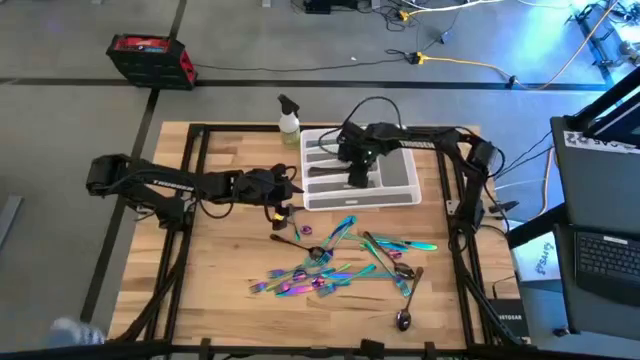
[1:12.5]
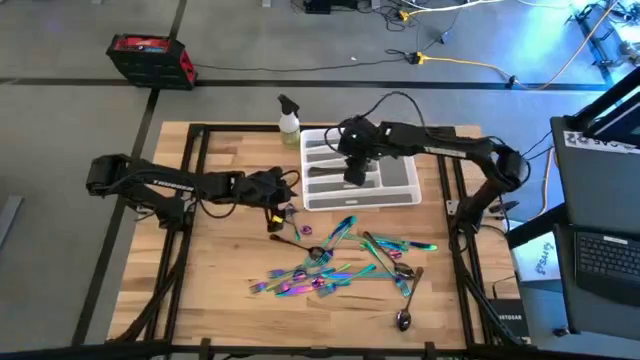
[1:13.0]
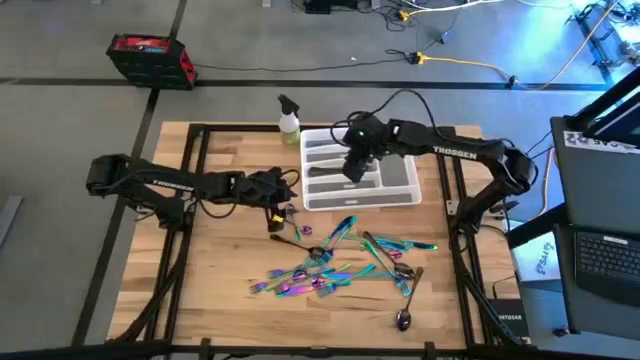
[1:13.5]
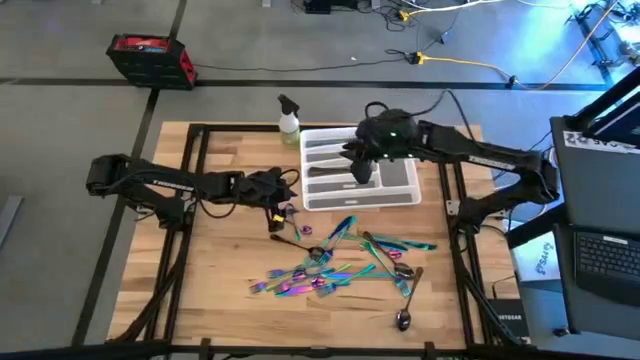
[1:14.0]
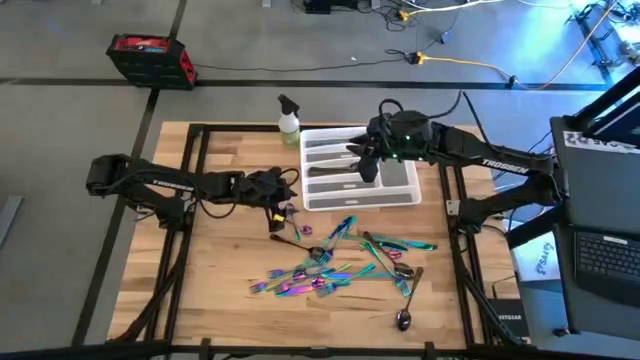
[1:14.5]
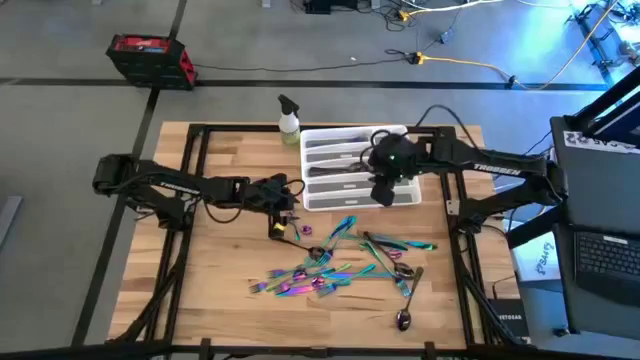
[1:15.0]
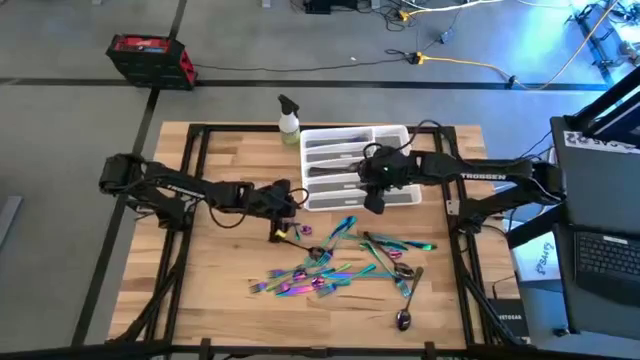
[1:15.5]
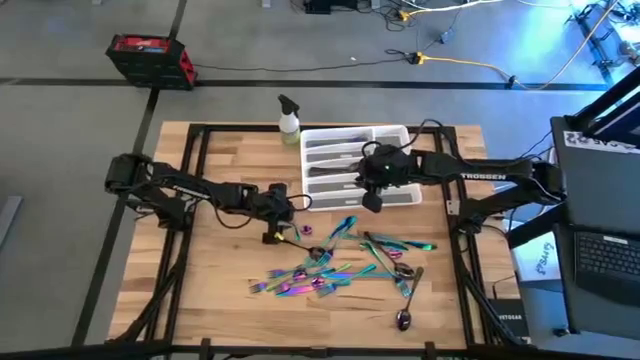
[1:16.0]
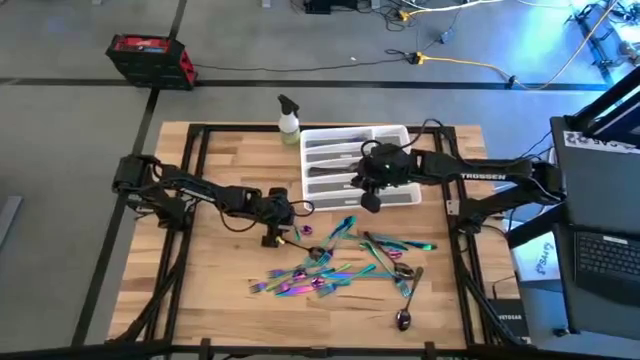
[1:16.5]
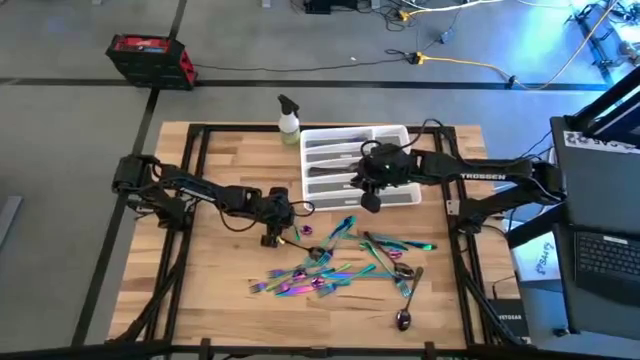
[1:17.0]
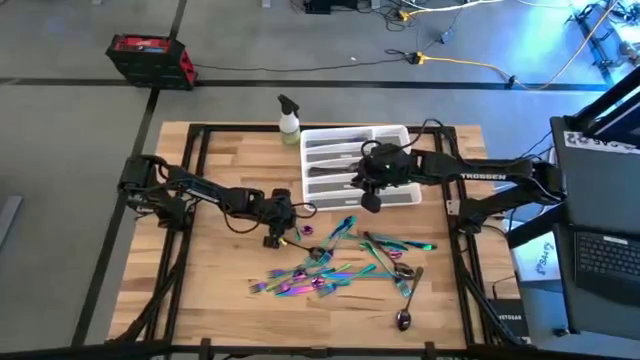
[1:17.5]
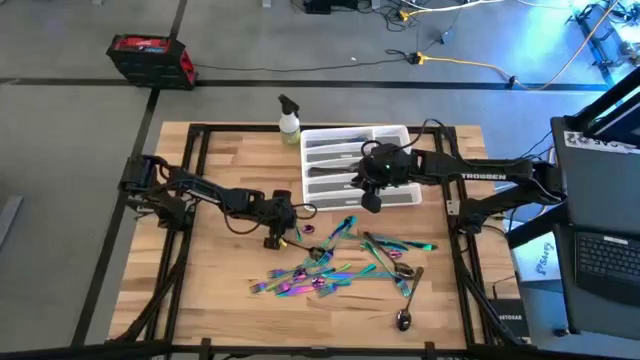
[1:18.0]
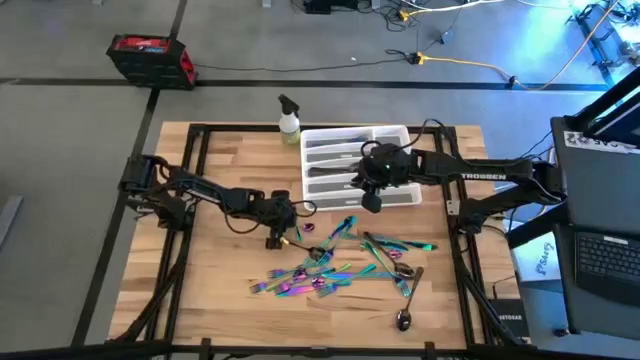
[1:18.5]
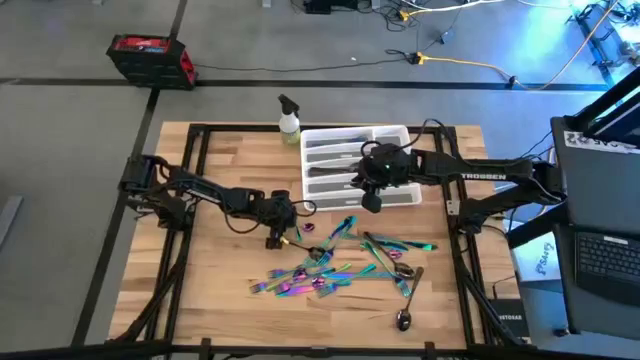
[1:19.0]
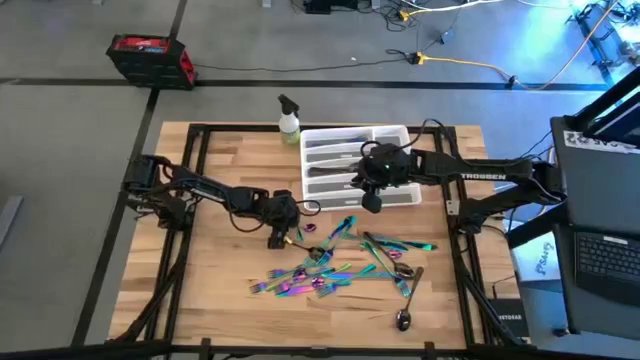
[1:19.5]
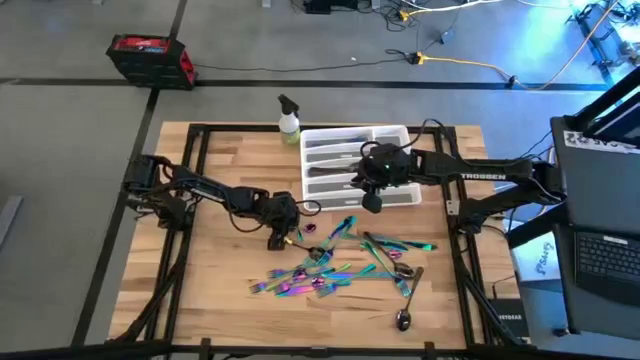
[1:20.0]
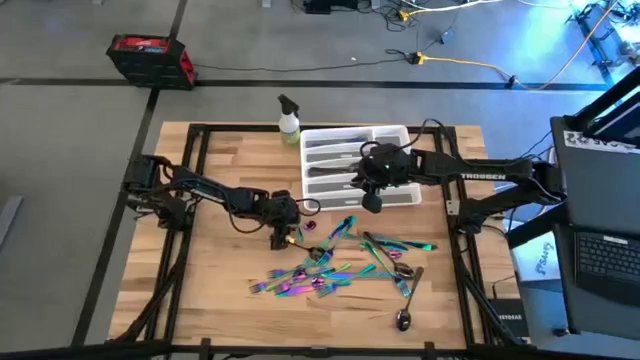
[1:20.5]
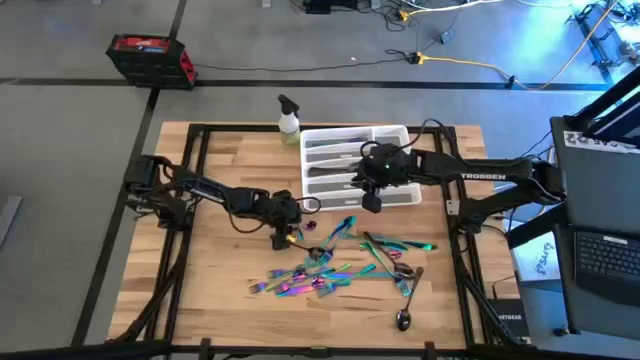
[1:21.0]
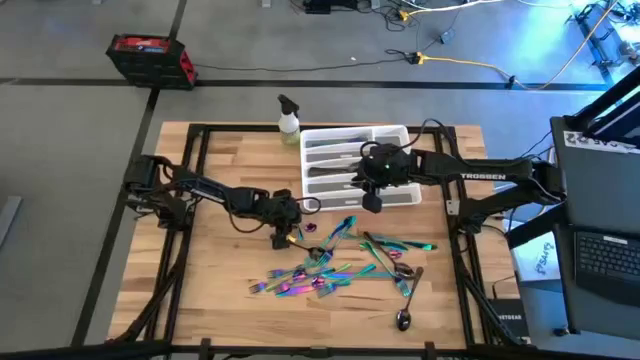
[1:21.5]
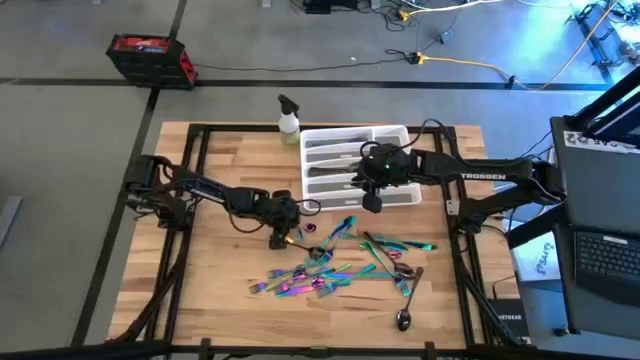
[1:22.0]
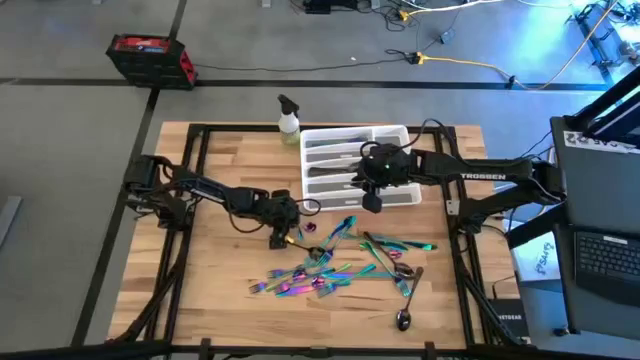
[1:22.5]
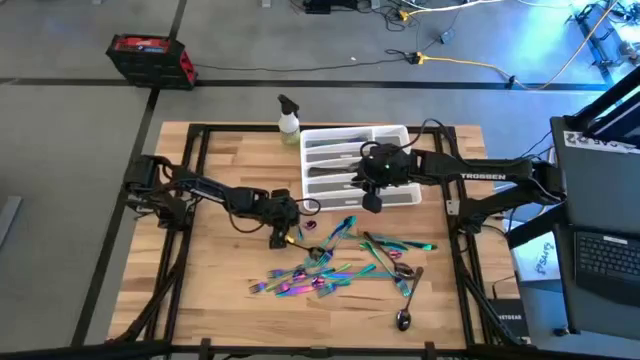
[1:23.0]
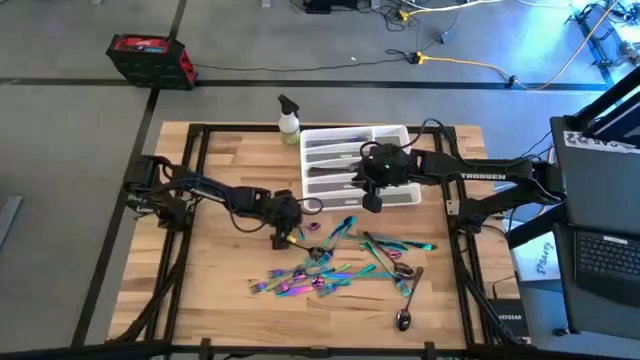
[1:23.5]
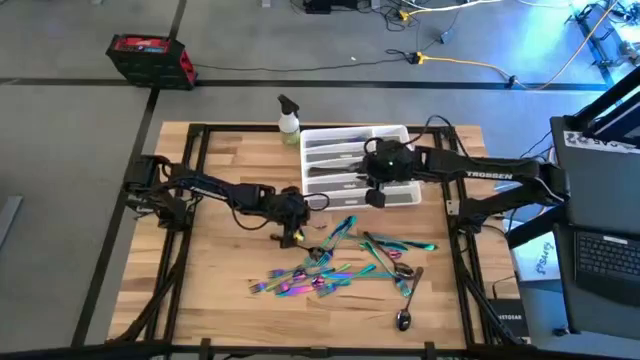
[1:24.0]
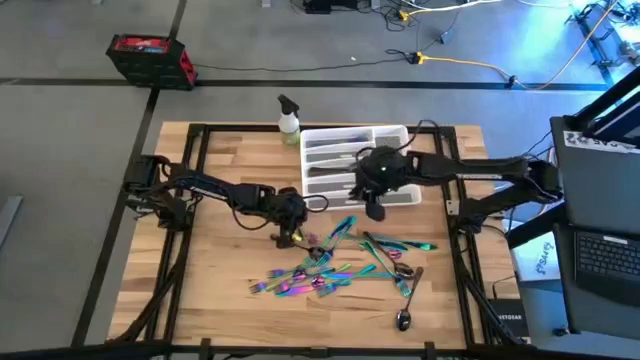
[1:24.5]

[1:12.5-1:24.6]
Task: Sort silverware
Put the blue teaspoon on the white silverware tray

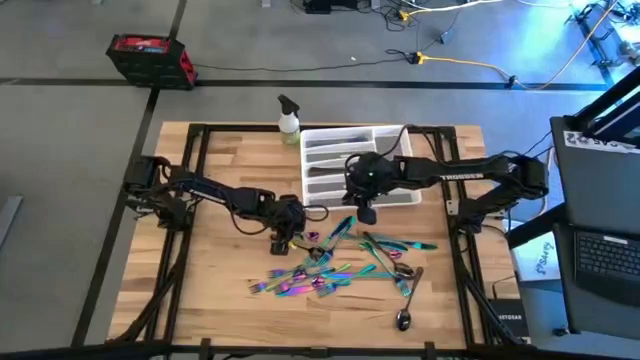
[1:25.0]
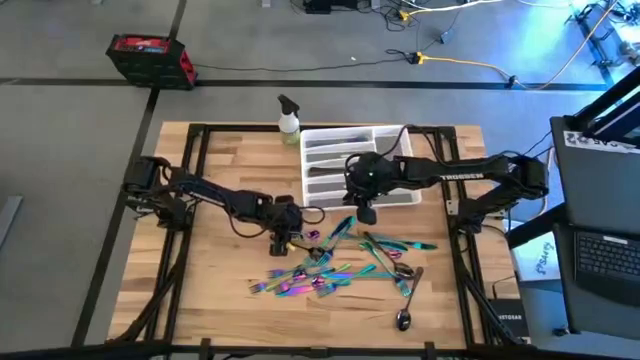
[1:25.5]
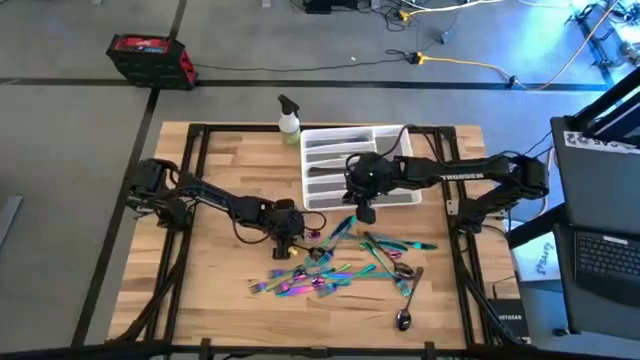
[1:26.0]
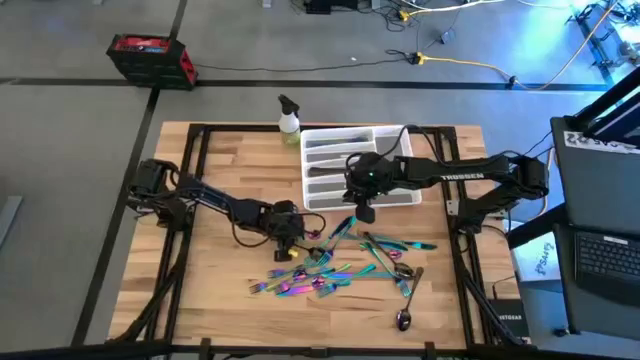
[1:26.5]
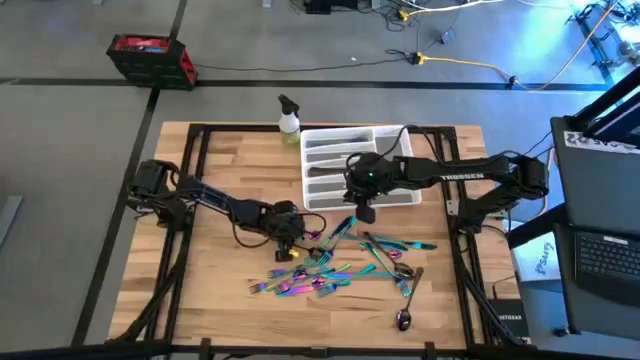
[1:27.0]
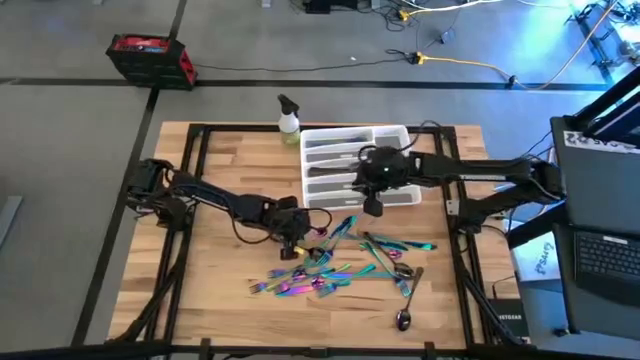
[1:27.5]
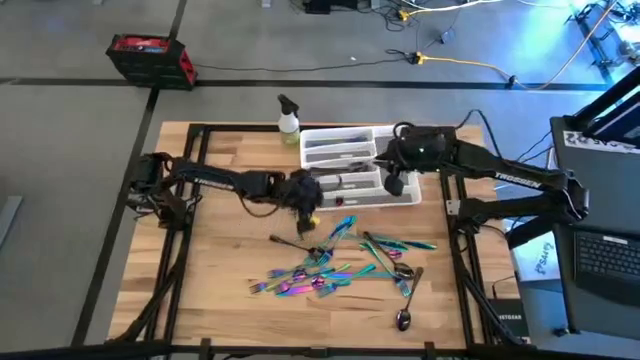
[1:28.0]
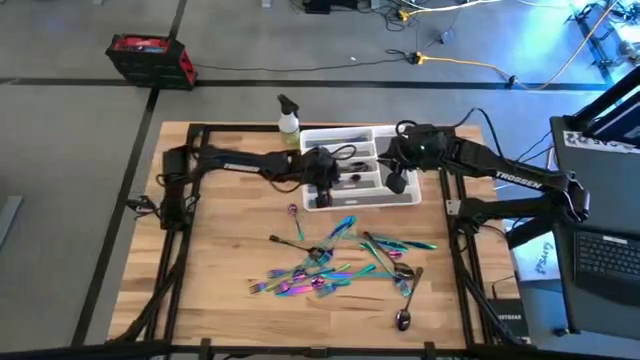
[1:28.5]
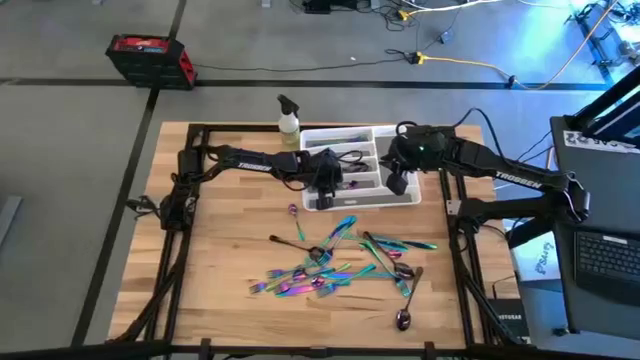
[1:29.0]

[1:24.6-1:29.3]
Put the blue teaspoon on the white silverware tray

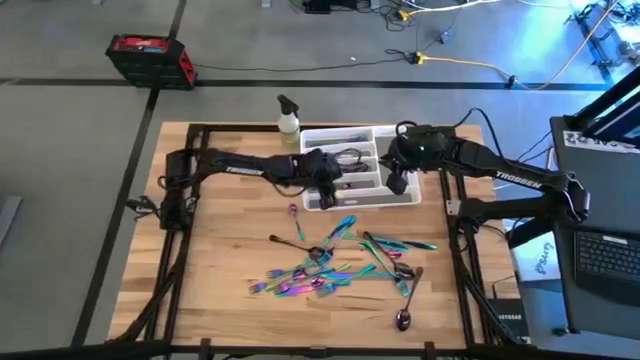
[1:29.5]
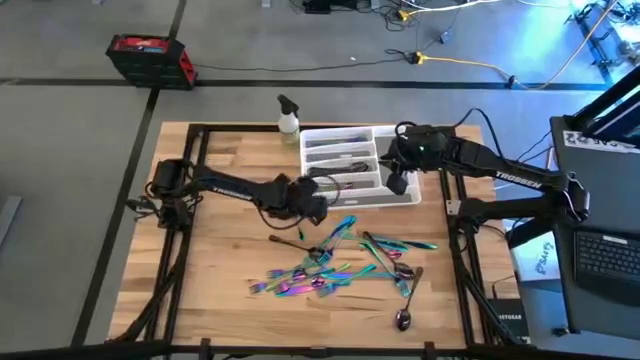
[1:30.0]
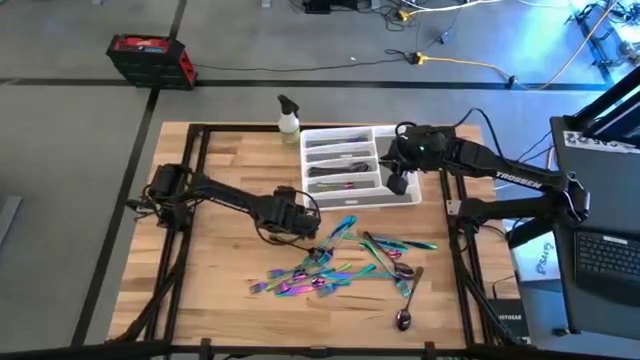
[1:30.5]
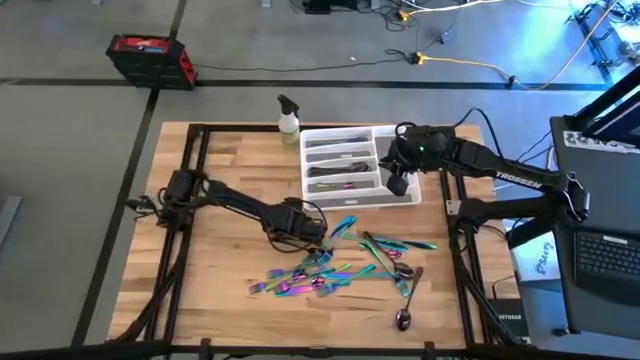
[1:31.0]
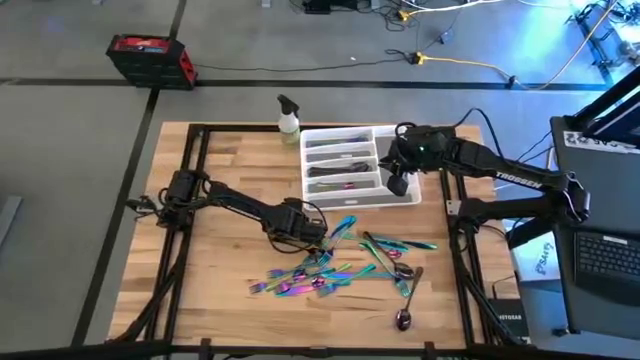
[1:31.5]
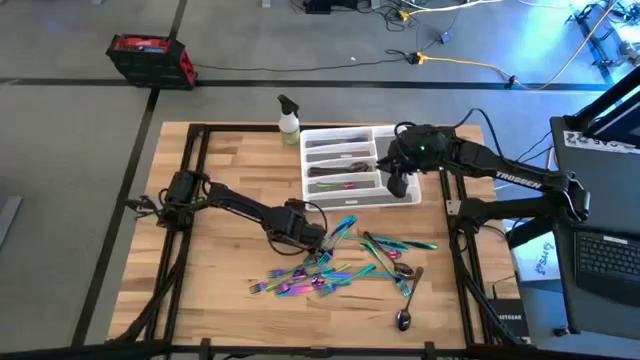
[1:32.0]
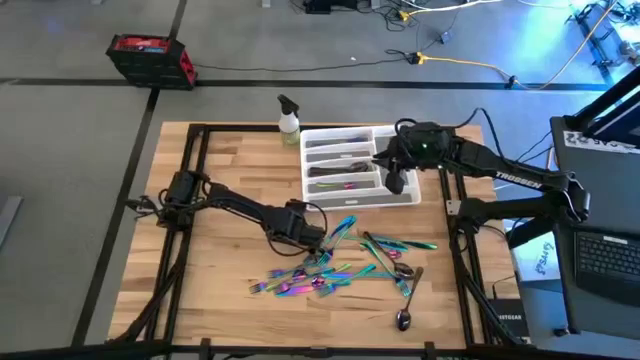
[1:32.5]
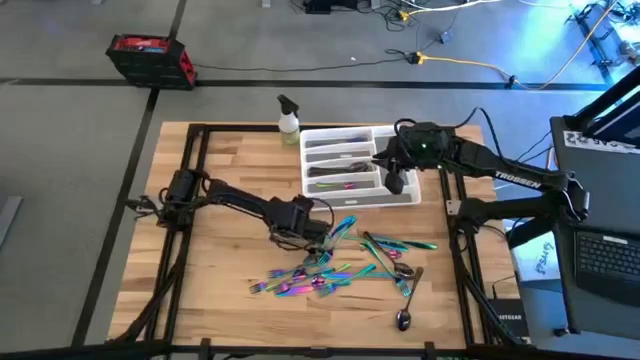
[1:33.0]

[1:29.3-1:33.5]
Put the blue teaspoon on the white silverware tray

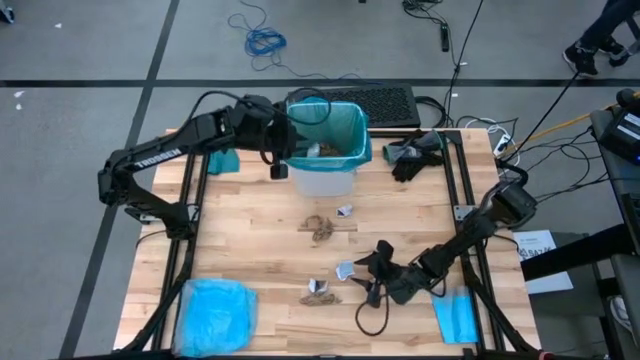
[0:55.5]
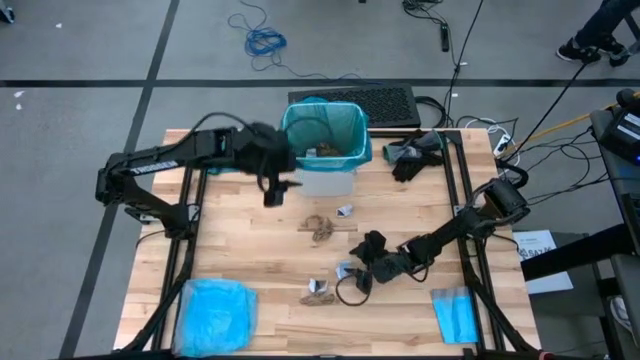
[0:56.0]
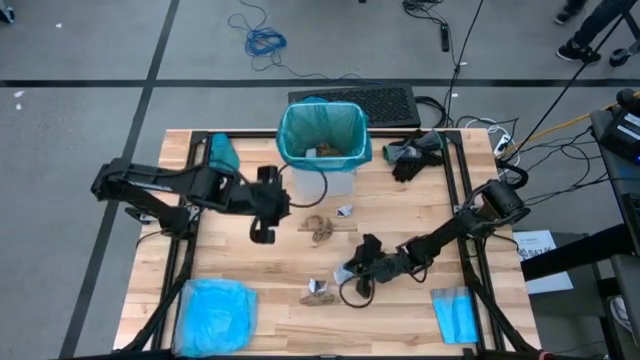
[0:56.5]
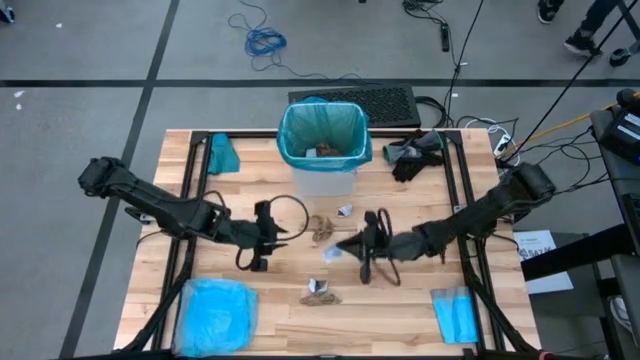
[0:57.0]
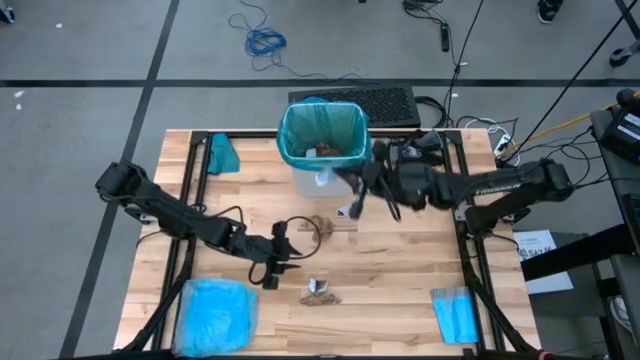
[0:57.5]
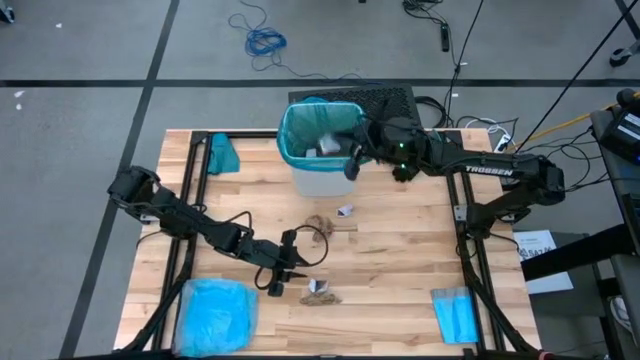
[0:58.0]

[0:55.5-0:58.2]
Task: place trash/remove bag and relplace
Put the white paper into the trash bin
